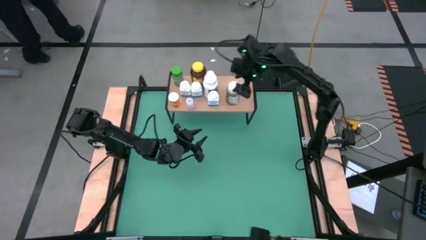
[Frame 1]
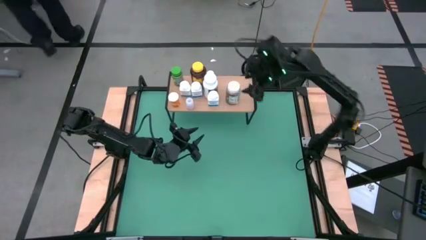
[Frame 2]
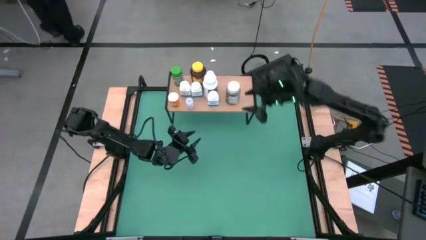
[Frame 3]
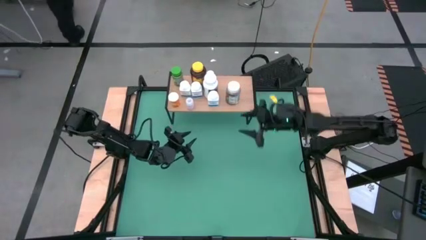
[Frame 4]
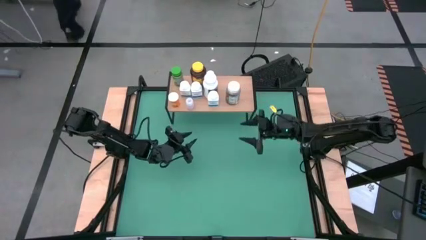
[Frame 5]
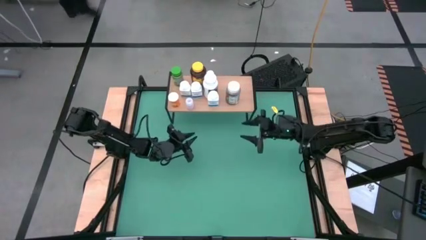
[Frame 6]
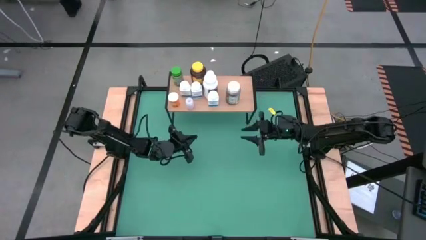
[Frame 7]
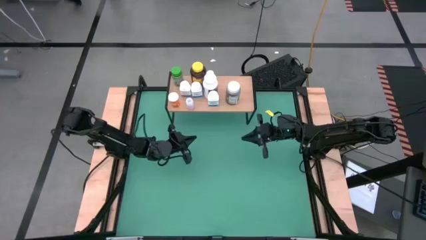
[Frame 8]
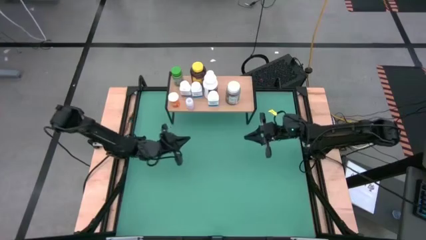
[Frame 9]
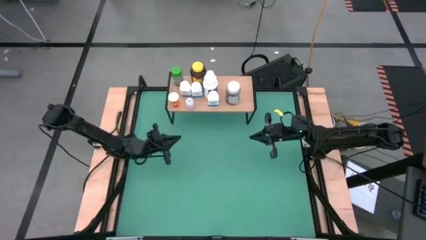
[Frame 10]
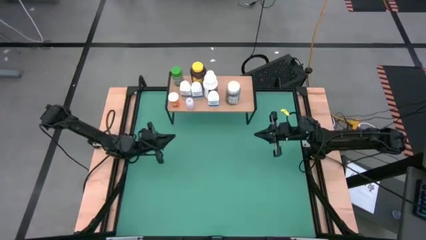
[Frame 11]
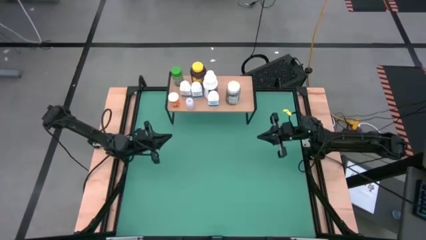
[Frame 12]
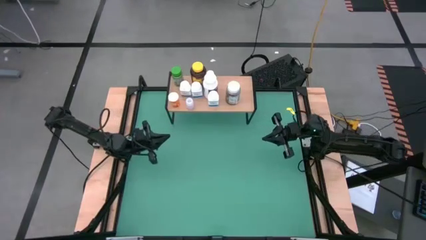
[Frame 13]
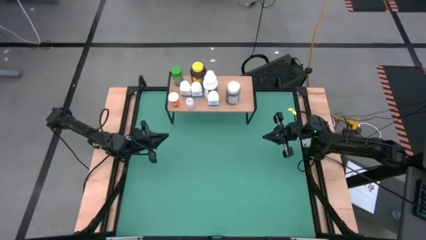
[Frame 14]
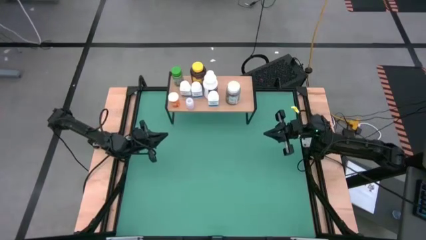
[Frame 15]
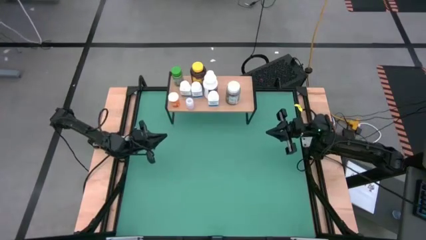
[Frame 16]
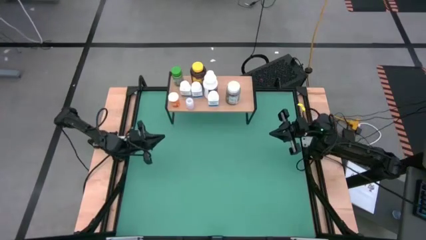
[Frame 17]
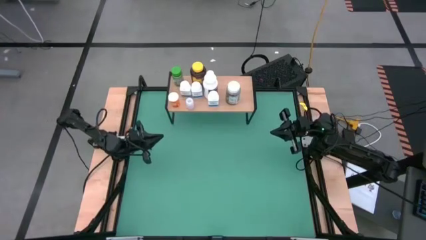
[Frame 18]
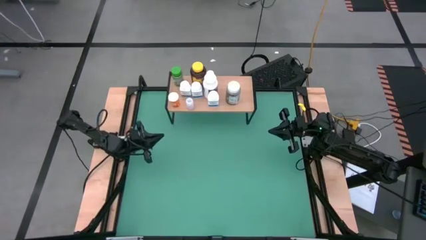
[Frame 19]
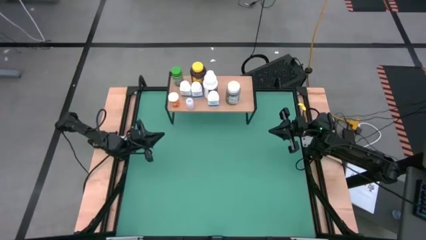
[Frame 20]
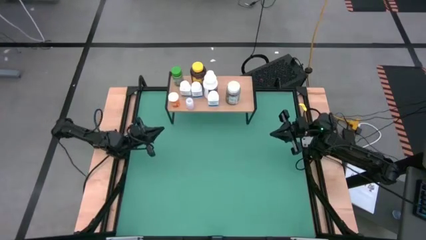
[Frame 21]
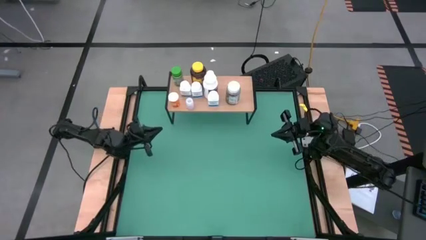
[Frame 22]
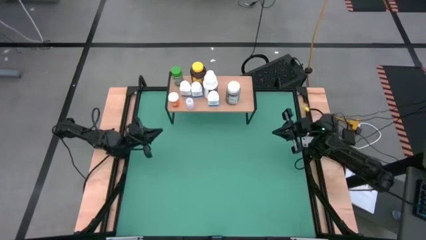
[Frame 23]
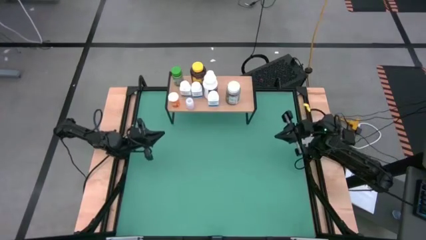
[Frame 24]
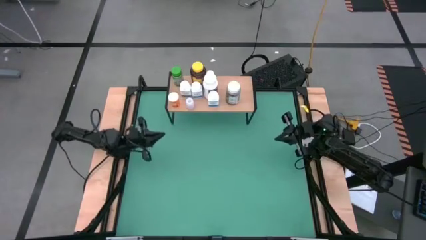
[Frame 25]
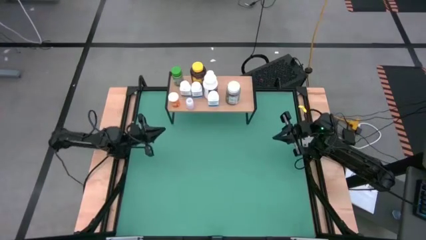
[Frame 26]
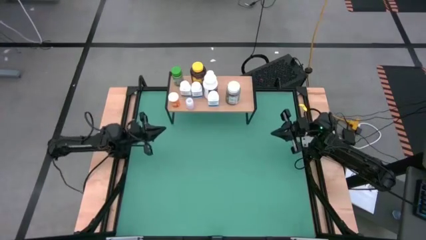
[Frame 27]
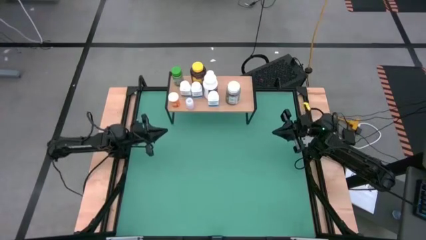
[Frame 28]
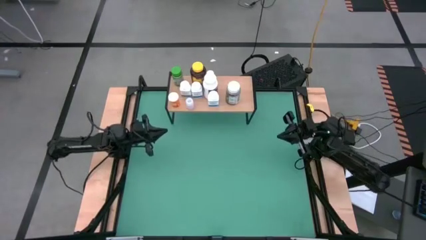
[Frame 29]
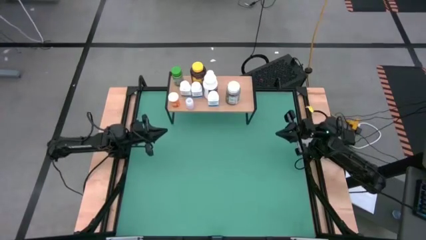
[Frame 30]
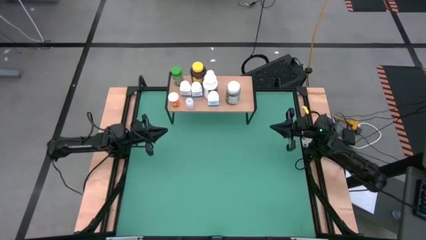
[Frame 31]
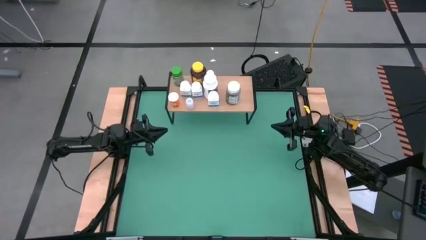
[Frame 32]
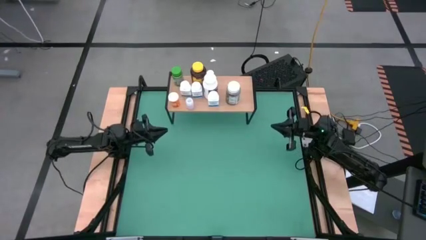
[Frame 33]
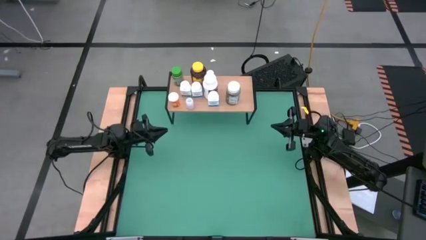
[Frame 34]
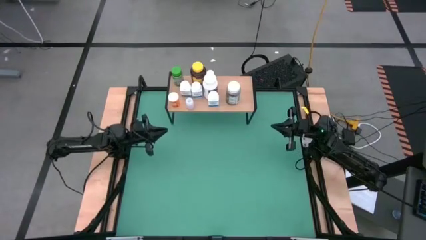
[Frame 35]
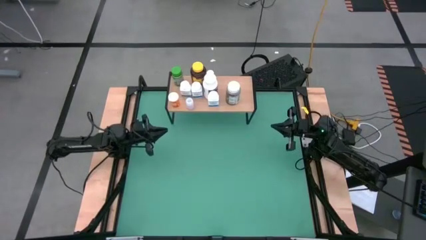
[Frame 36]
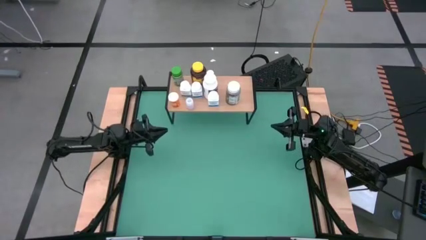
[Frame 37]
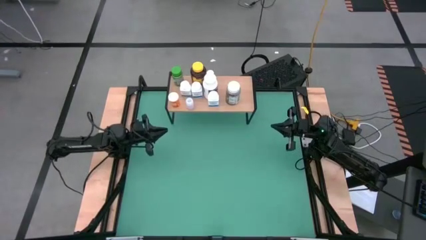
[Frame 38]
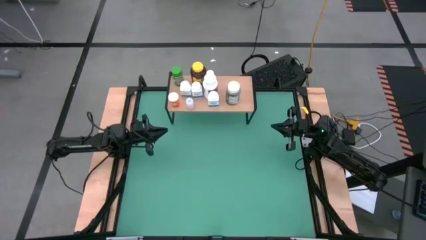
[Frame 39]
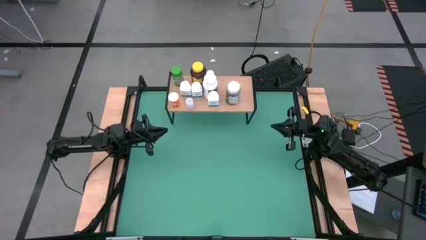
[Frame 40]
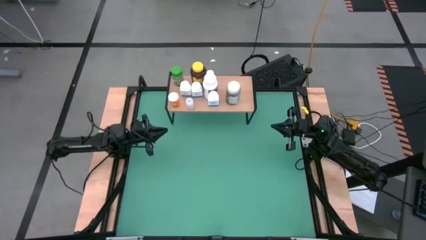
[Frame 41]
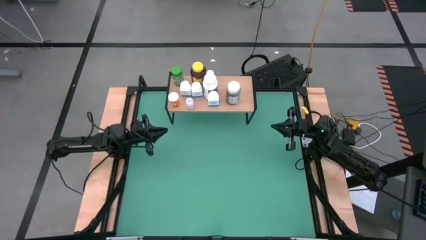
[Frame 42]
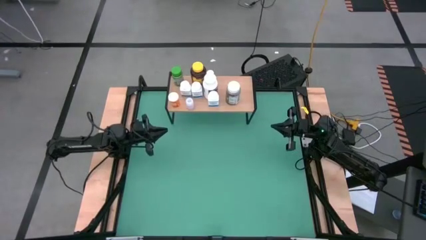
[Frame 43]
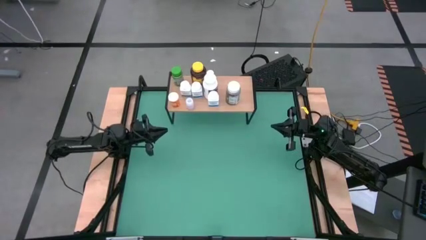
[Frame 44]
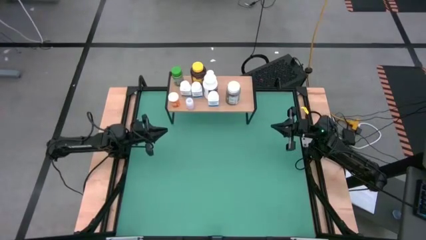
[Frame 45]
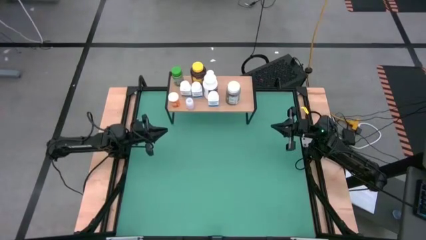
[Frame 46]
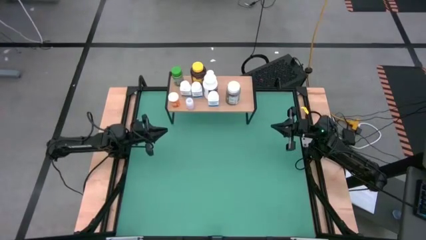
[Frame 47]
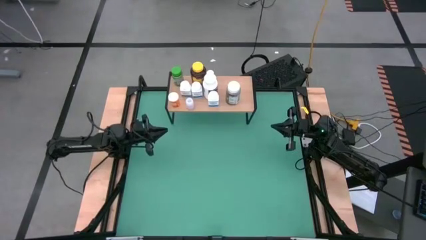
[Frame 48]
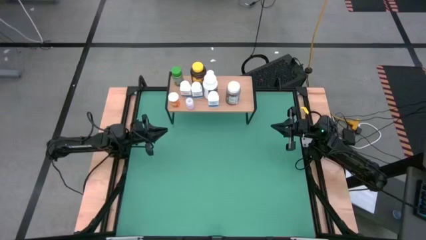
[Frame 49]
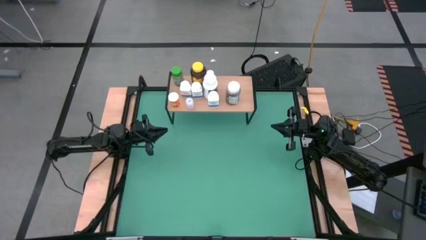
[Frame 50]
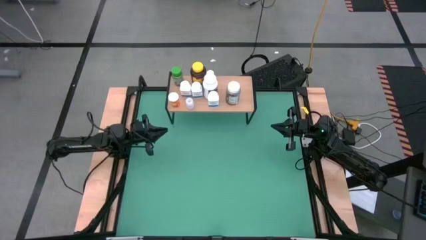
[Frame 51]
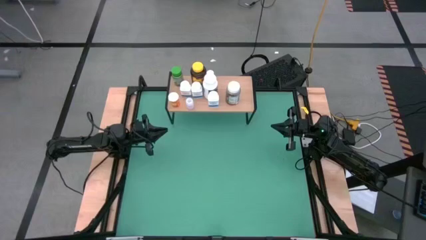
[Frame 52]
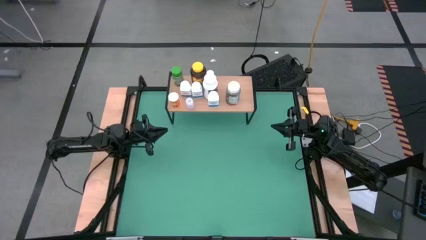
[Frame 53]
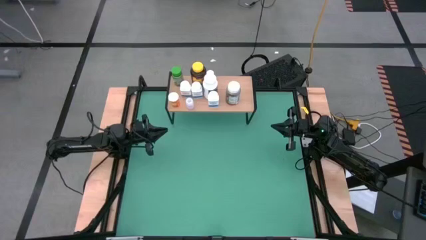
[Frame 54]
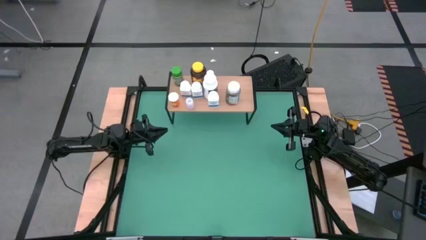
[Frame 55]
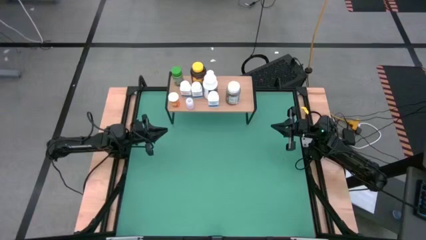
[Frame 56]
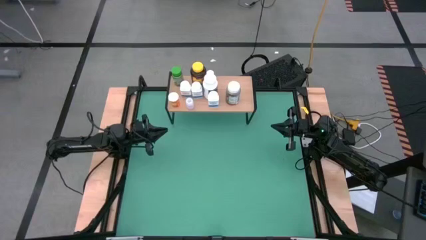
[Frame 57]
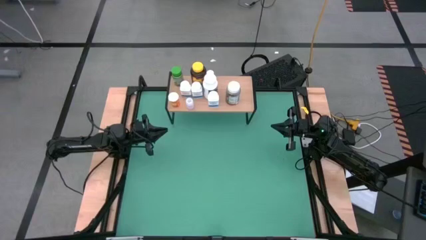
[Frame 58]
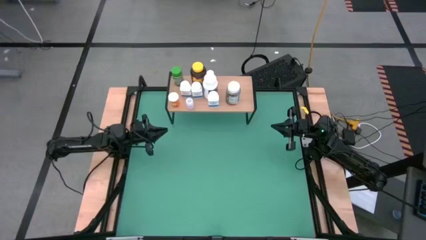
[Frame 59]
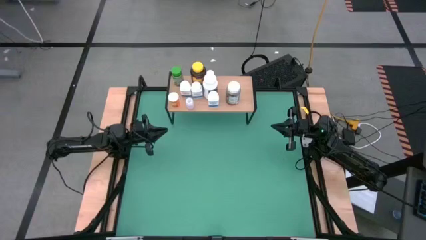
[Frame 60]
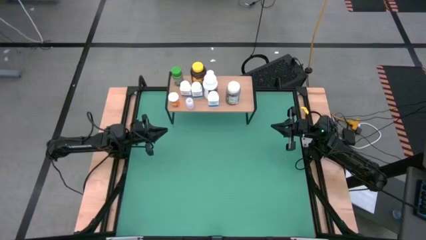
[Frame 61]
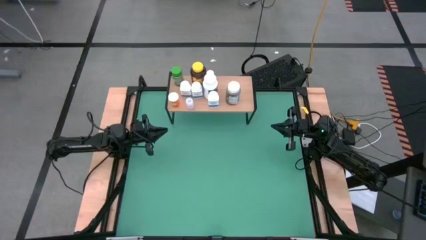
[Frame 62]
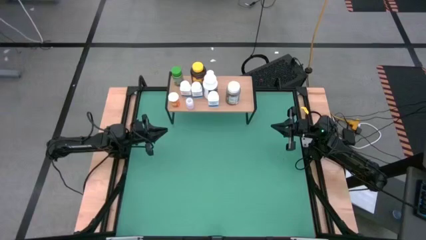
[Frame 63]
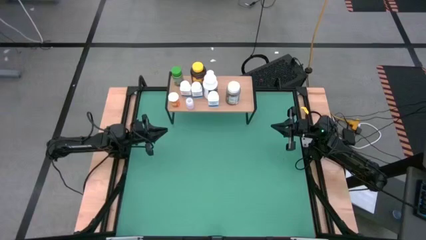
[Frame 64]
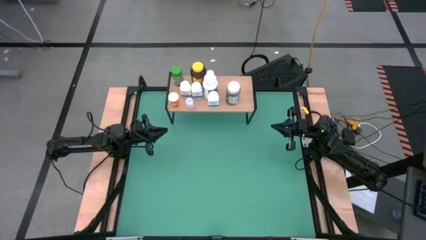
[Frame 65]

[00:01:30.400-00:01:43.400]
Task: Pick and place medicine bottles onto shelf by color
Return to Home Position

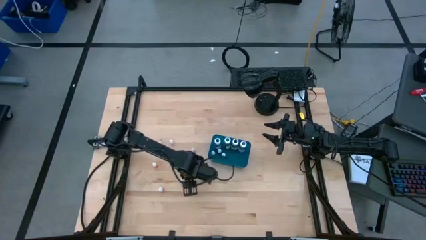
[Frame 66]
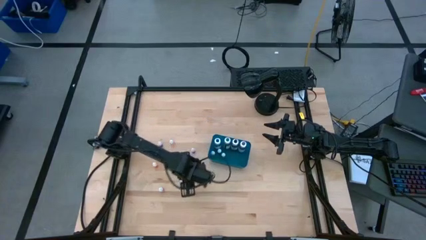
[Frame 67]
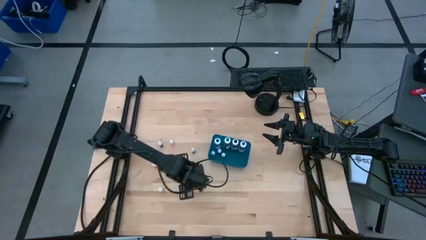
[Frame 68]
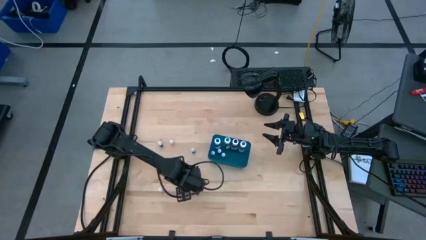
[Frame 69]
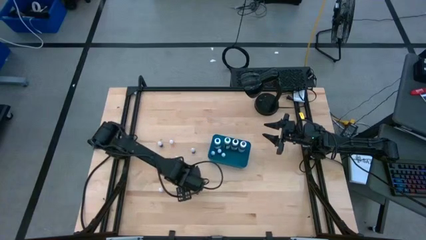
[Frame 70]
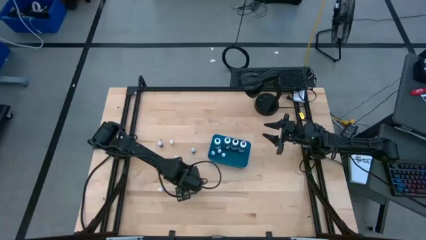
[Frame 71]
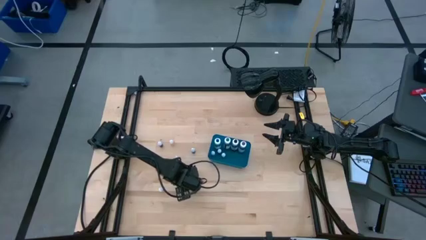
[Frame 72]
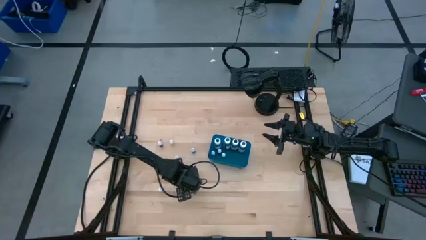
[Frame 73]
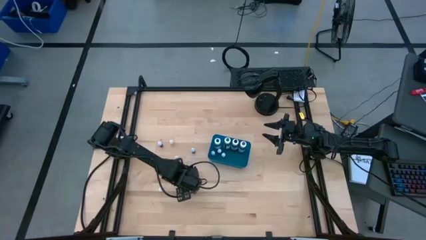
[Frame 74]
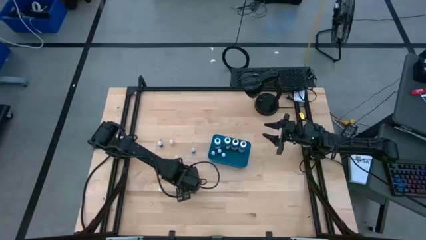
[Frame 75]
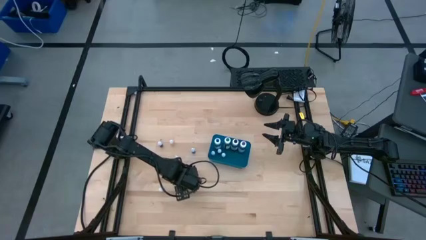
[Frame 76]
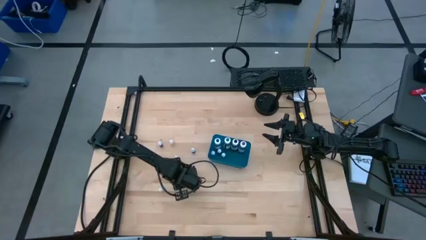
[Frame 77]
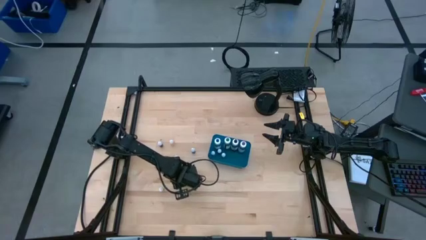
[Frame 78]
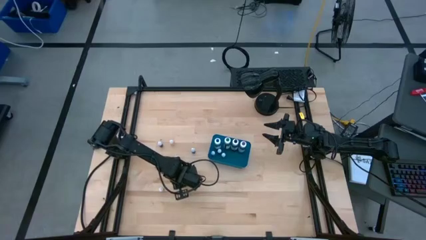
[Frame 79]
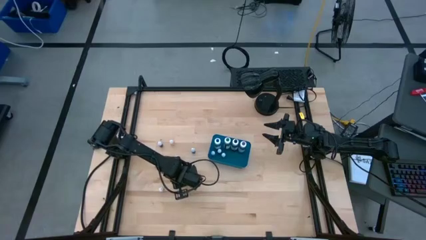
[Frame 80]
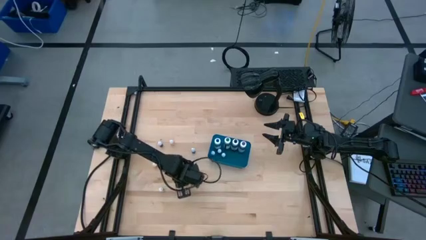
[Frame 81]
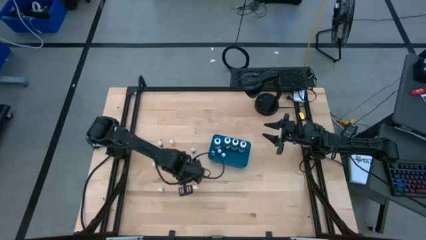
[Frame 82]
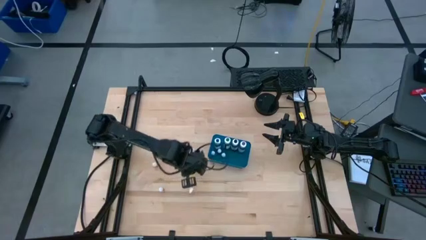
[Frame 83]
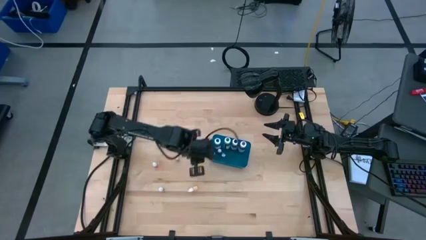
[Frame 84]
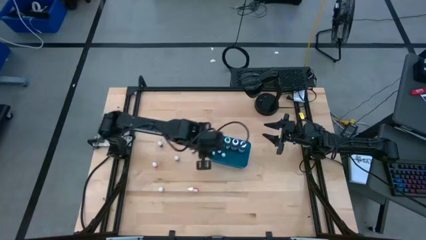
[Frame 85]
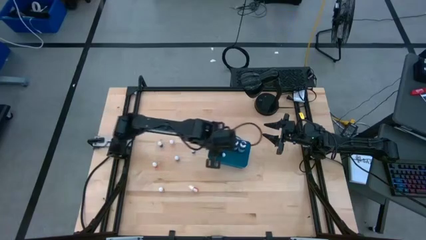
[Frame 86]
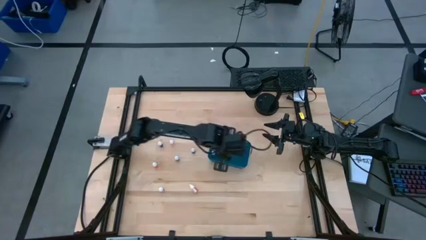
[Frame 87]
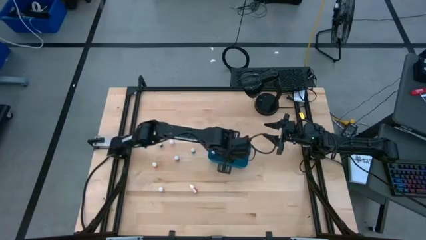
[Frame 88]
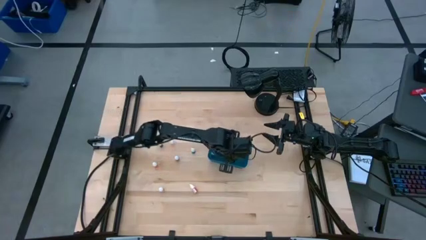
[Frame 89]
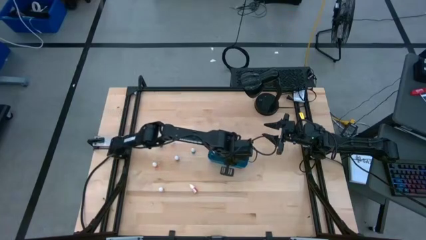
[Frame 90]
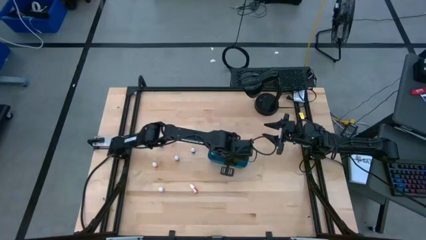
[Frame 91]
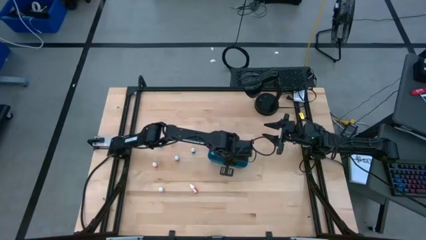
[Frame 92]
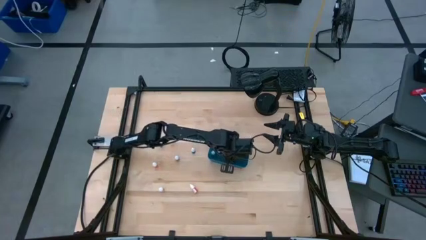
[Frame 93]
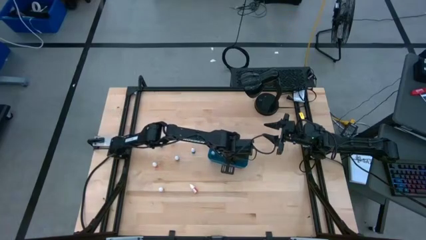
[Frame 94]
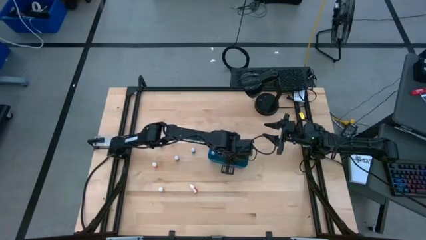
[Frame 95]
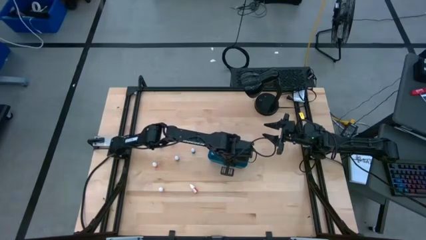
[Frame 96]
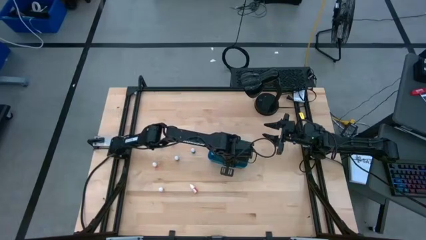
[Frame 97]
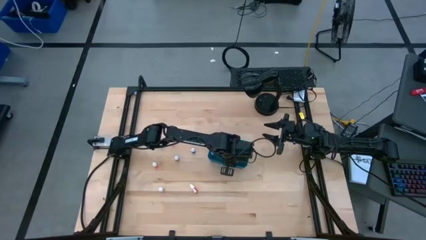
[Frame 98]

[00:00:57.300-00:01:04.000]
Task: Pick & Place food coloring
Put the small green food coloring bottle into the blue container
